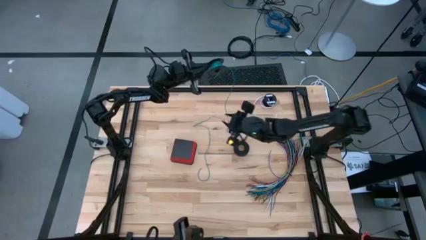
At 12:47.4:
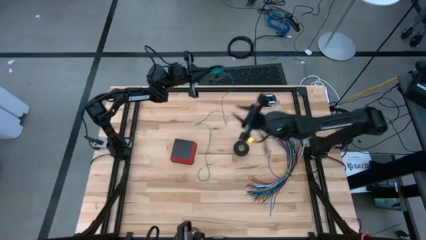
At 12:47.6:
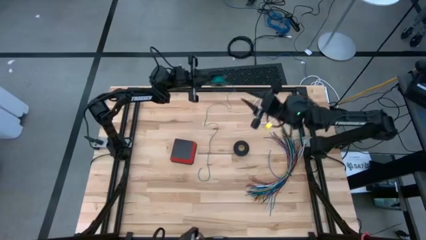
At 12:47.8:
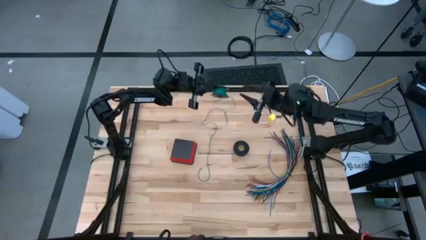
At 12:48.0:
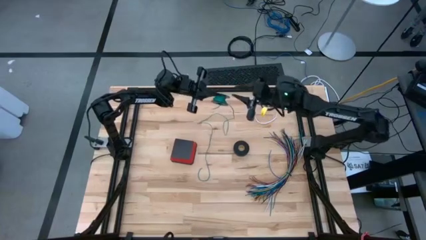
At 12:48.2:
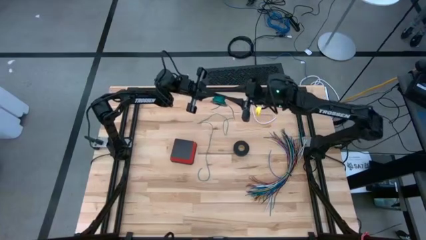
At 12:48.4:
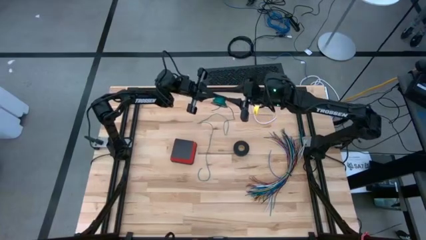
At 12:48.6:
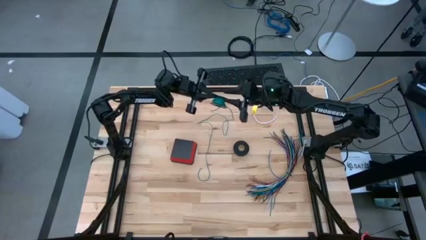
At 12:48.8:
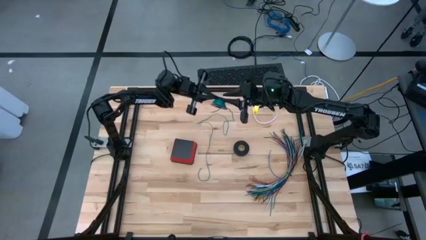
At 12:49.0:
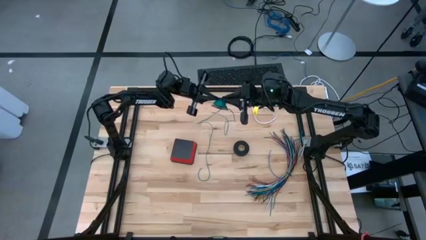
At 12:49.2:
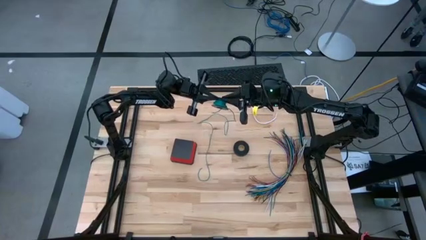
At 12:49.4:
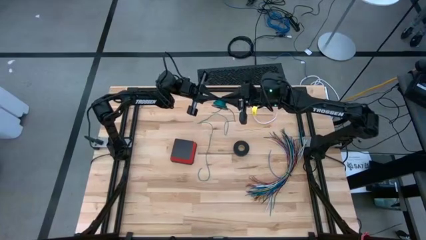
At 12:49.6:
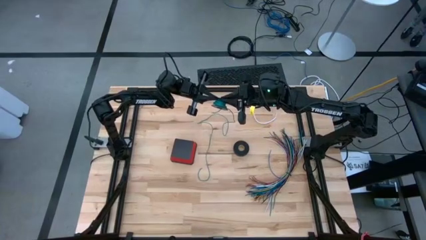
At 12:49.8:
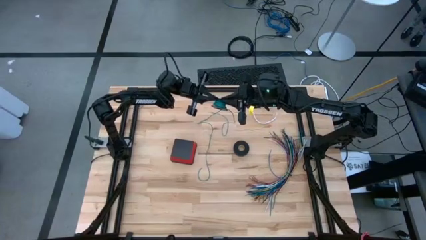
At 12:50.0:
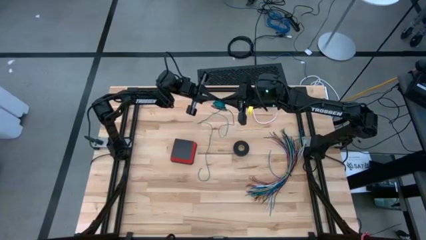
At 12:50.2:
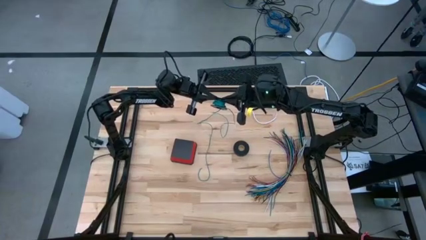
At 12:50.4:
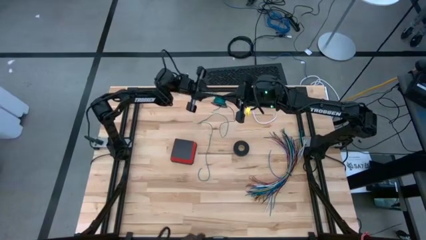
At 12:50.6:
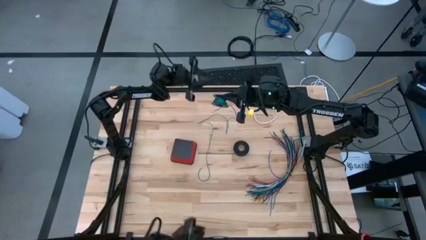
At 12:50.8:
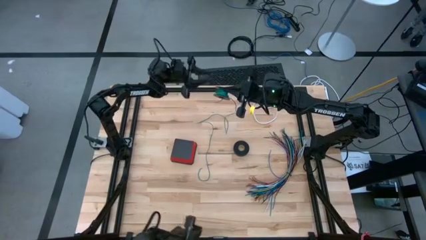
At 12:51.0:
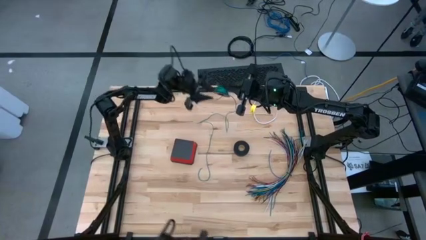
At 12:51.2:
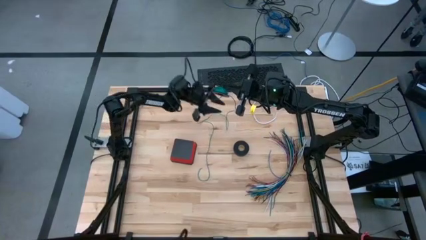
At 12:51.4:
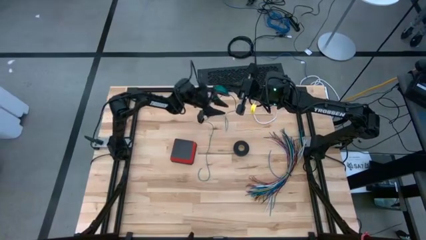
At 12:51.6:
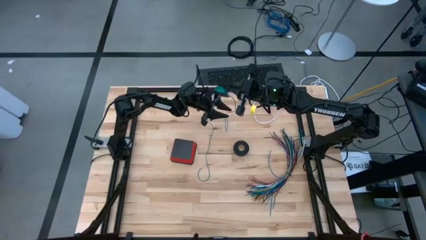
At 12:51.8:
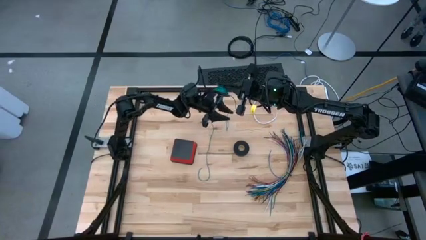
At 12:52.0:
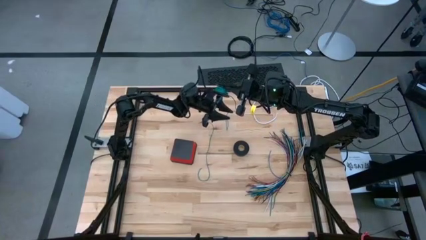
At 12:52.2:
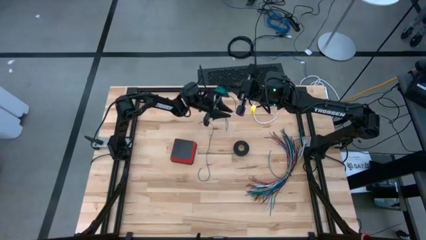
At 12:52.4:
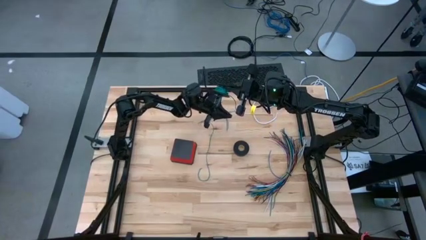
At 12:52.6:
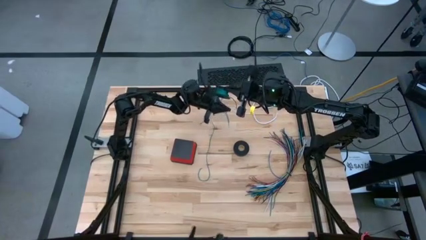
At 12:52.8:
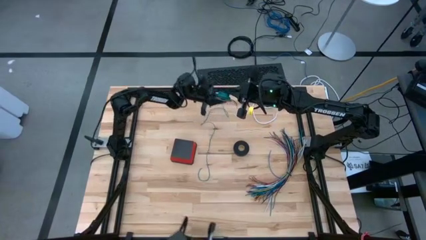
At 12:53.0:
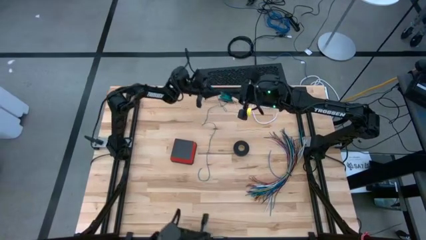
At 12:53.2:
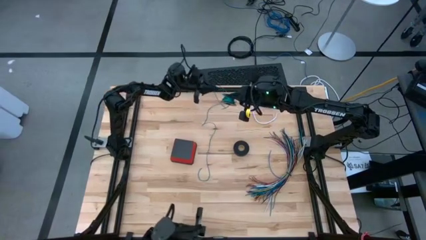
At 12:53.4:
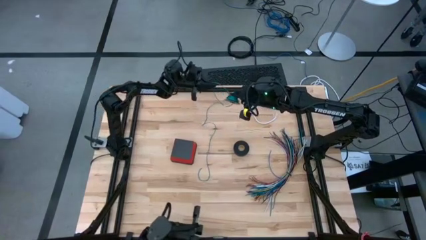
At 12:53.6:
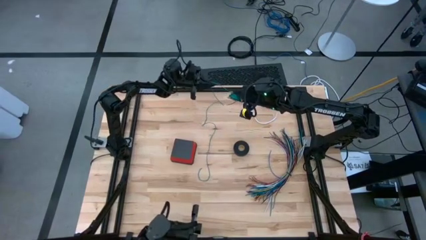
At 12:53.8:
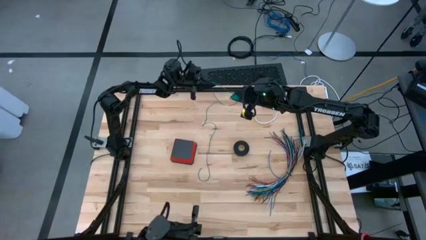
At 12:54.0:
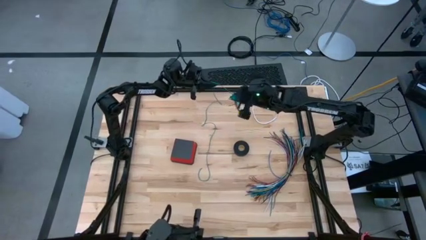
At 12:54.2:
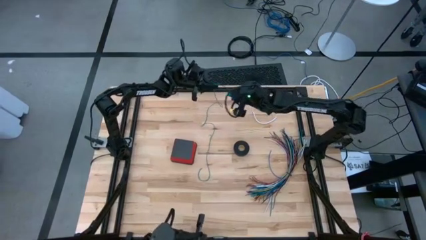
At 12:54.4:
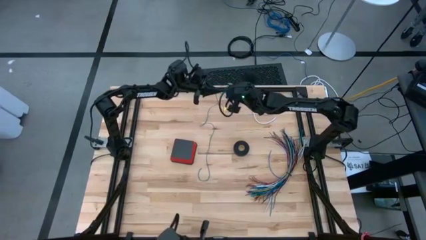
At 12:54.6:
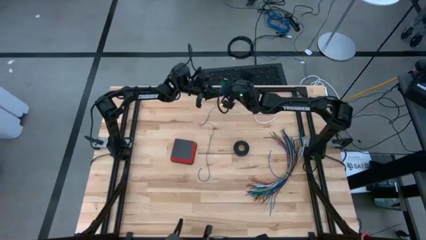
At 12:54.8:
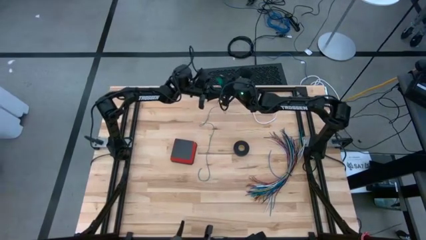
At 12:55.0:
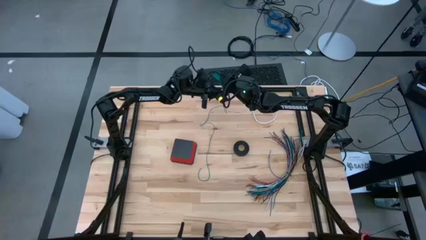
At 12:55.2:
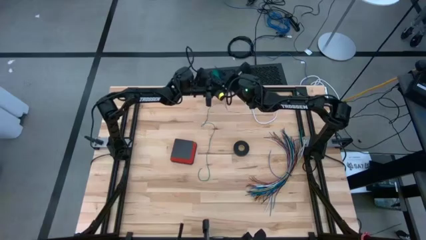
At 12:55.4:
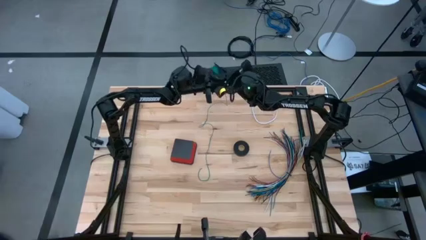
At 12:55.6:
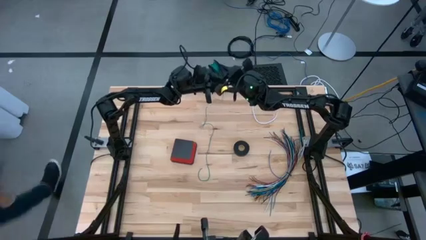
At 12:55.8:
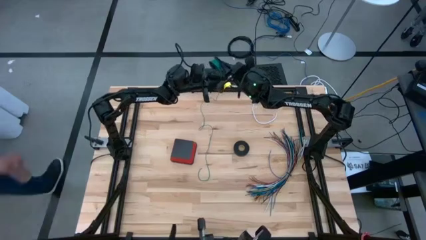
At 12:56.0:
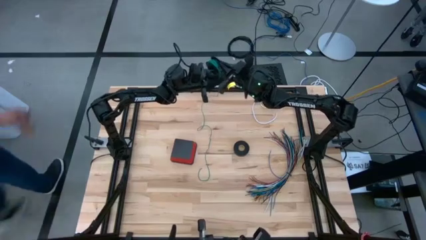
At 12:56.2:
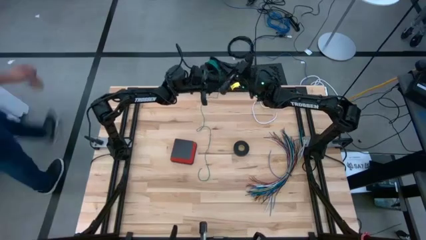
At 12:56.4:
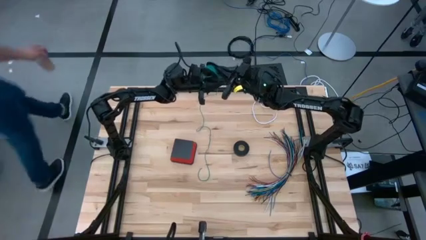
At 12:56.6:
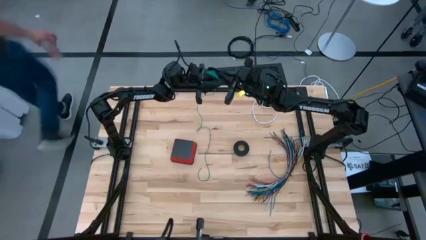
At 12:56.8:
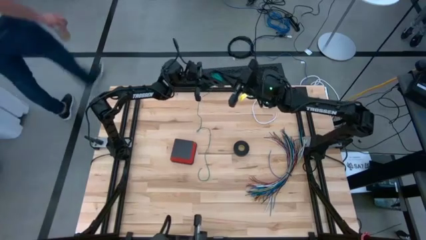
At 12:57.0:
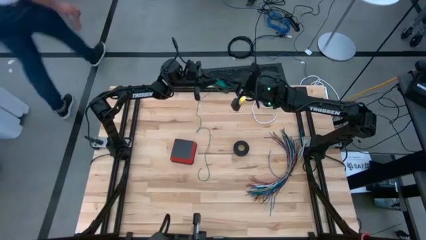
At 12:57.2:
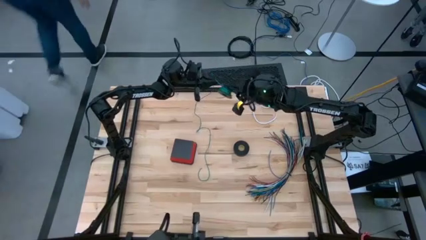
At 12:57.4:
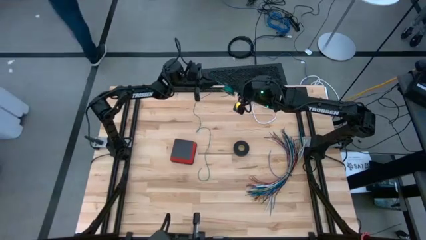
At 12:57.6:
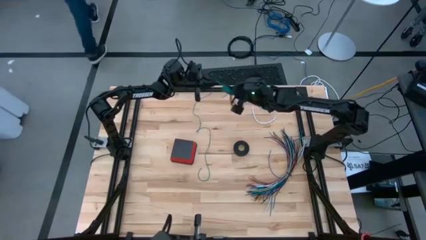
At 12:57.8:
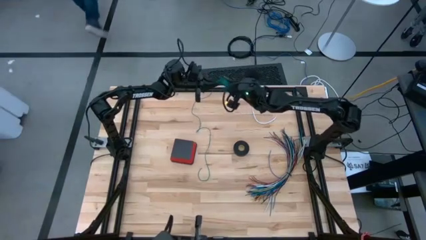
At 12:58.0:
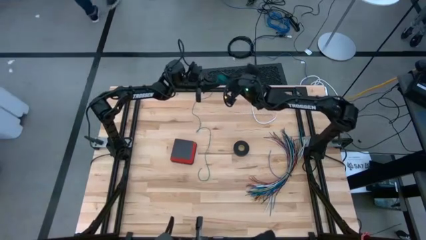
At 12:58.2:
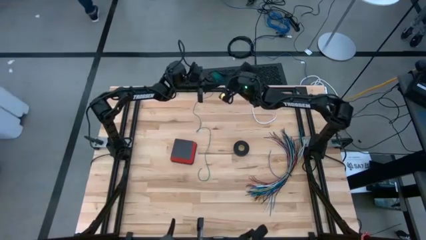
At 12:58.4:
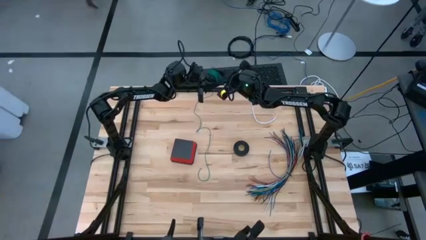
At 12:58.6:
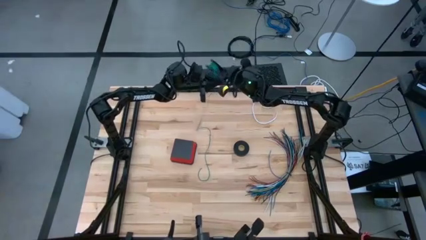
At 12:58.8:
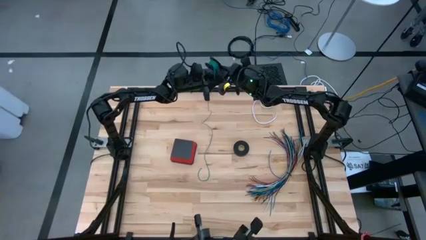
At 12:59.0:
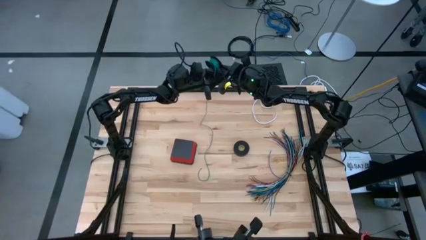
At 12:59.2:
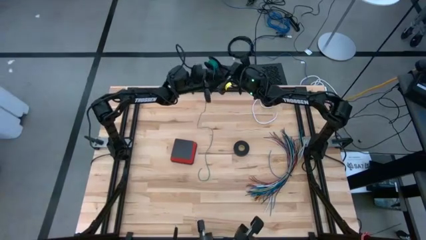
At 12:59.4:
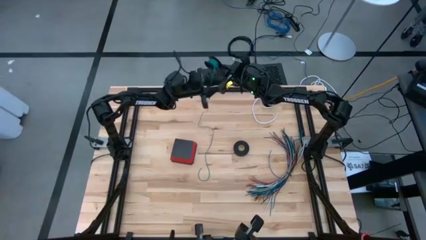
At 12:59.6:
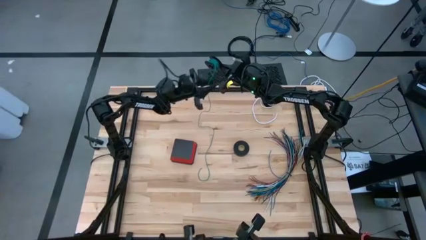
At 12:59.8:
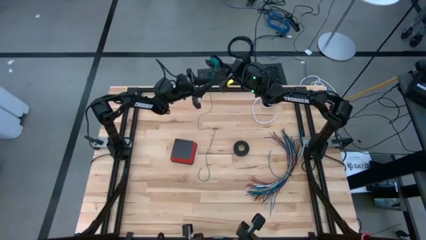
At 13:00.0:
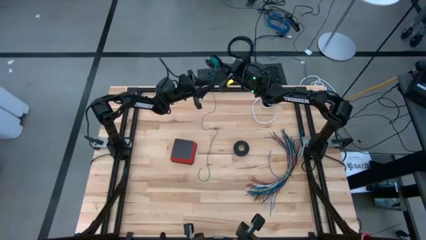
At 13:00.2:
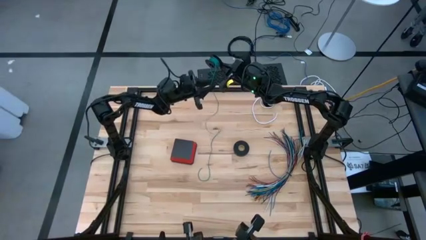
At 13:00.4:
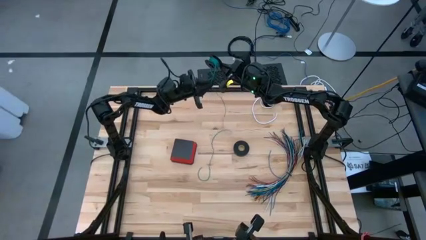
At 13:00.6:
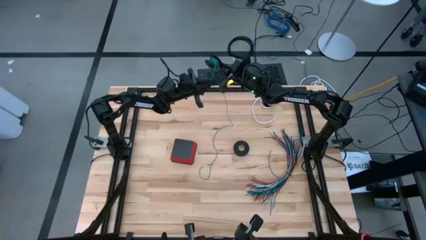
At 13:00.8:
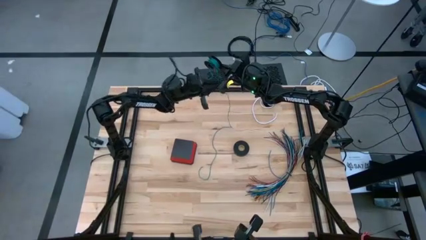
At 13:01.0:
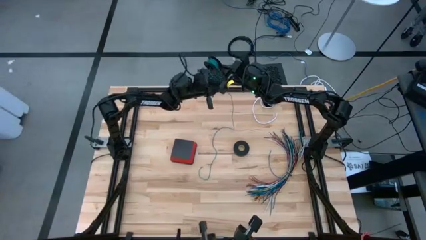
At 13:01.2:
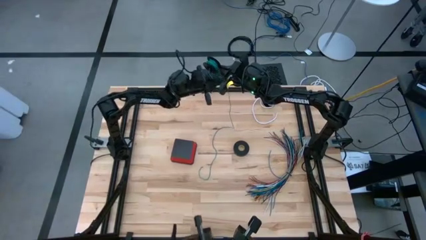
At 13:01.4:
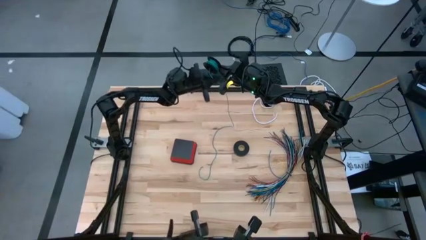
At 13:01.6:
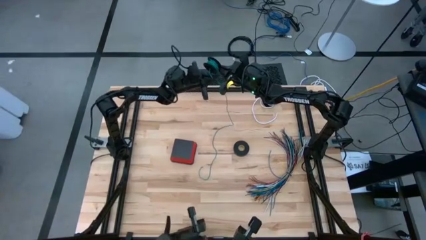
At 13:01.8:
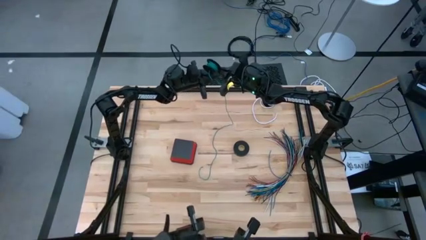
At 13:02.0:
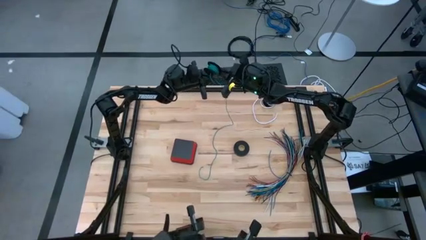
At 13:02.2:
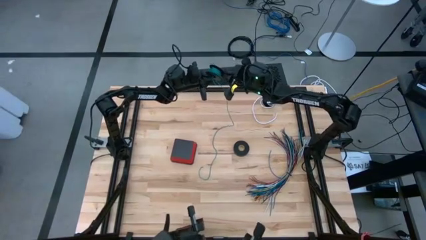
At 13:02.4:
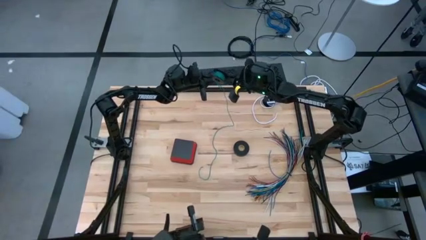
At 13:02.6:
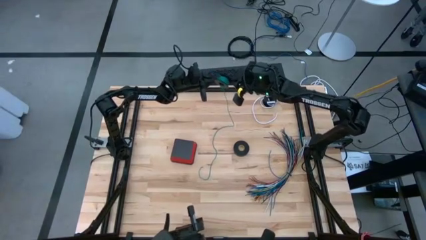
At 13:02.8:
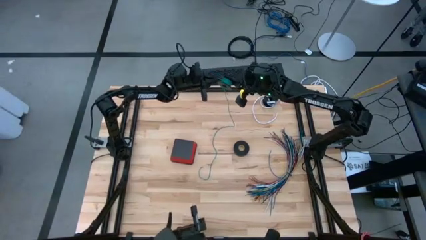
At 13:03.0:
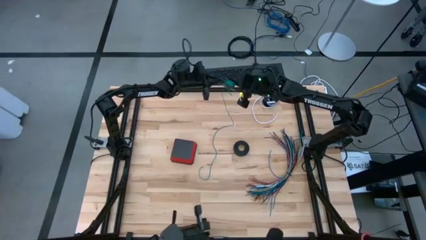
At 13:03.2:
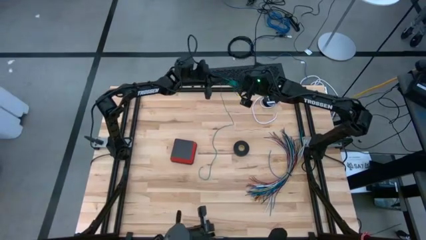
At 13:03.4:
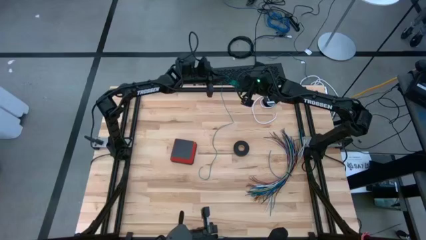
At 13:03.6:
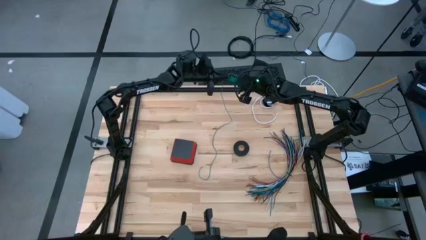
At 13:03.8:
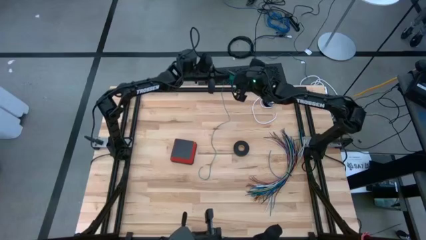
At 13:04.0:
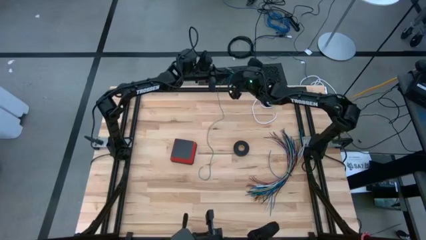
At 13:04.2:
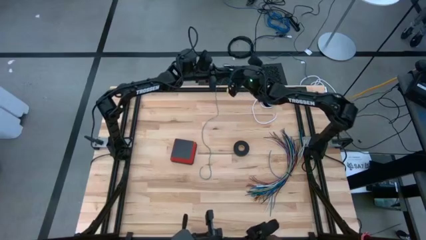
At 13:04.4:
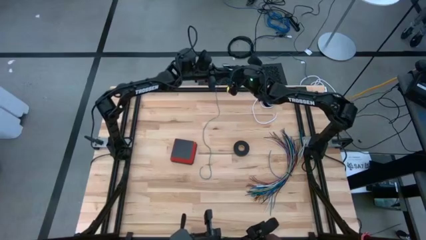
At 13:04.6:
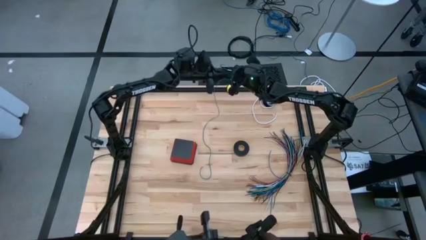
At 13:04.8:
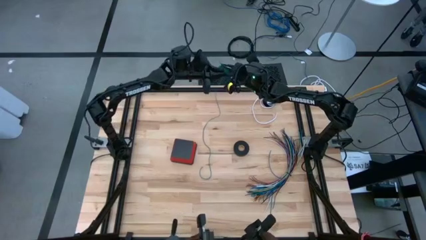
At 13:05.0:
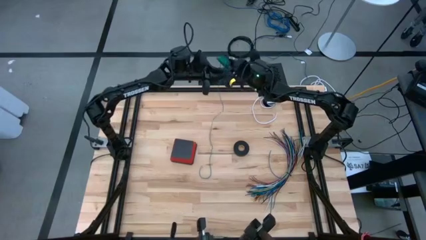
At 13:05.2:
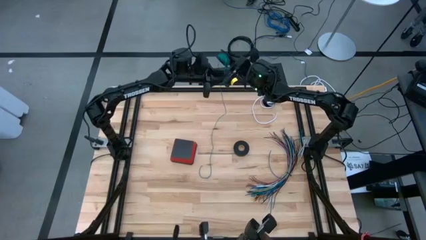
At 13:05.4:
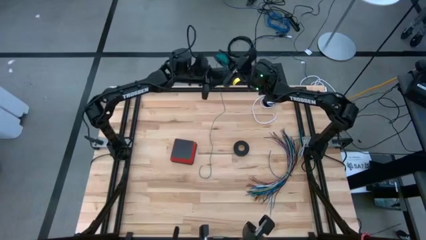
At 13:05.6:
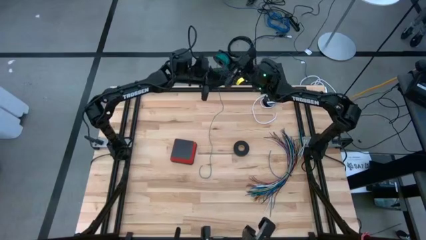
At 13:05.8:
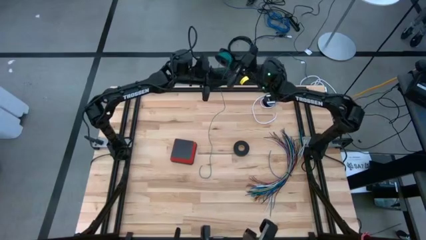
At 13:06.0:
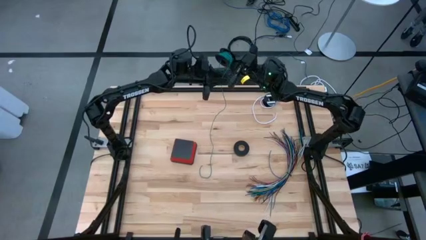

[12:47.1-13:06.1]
Task: Coiling cords
Coil the green wire cable on the spool
